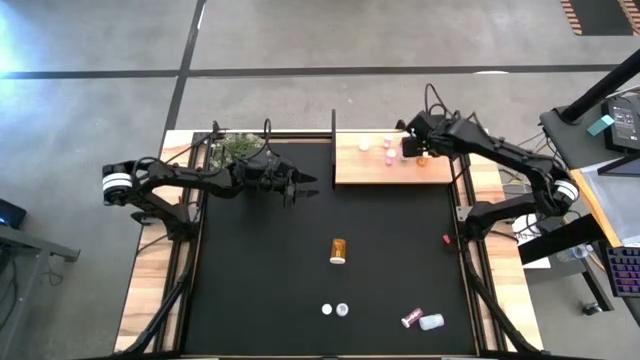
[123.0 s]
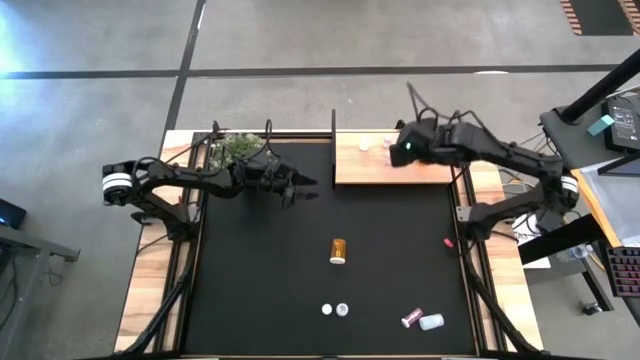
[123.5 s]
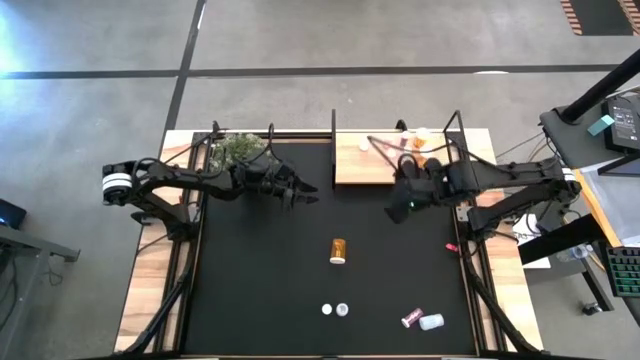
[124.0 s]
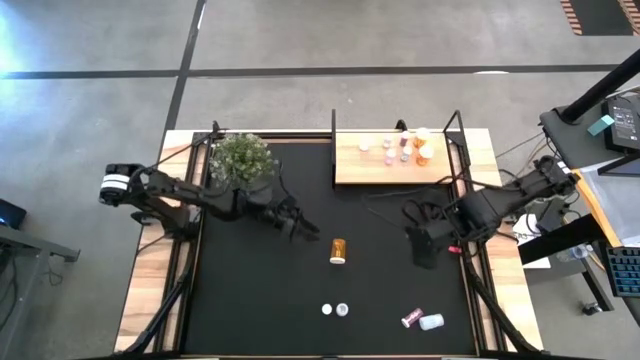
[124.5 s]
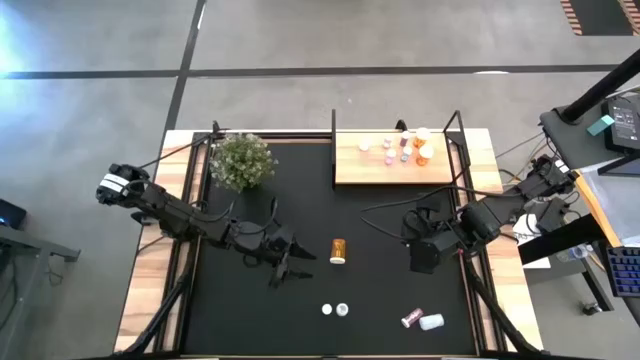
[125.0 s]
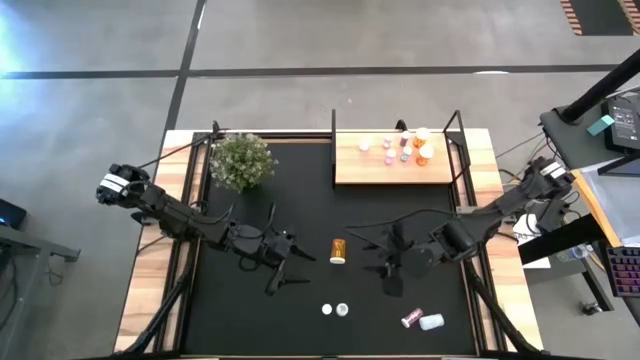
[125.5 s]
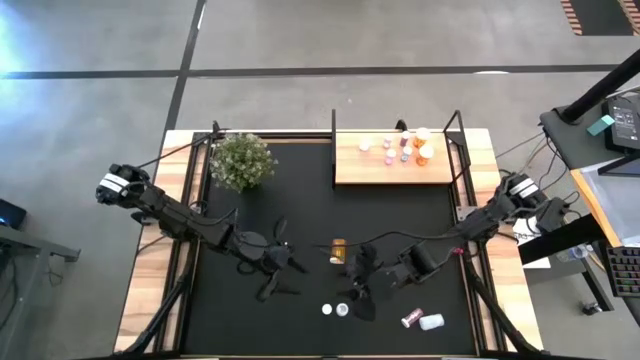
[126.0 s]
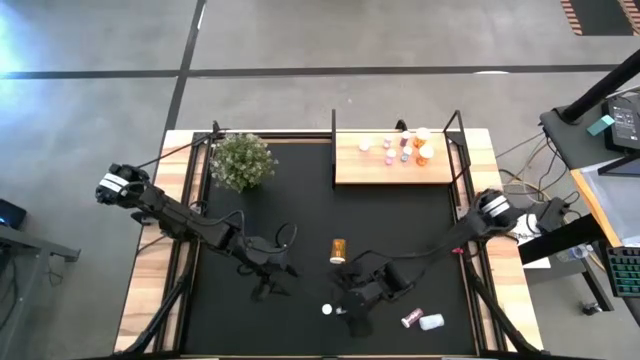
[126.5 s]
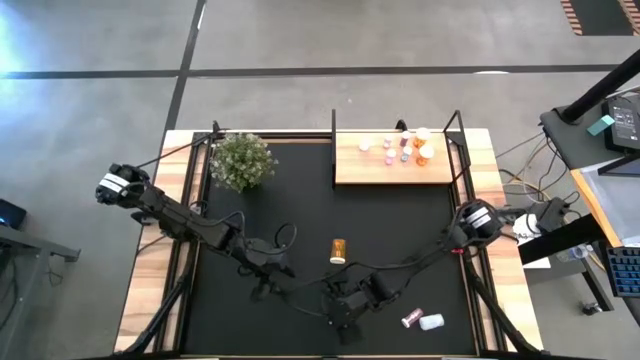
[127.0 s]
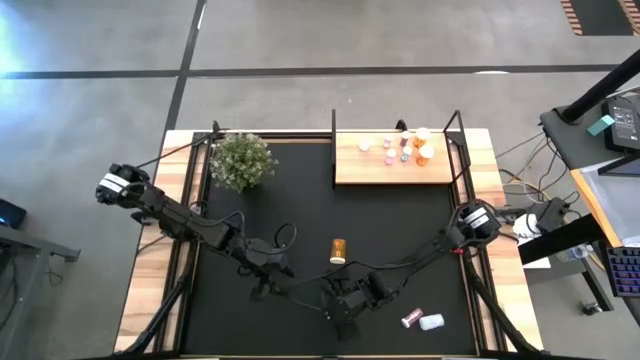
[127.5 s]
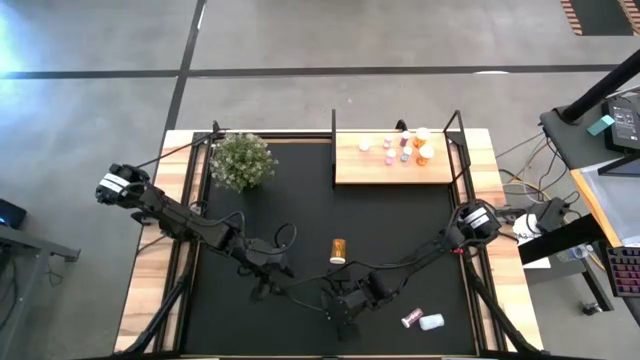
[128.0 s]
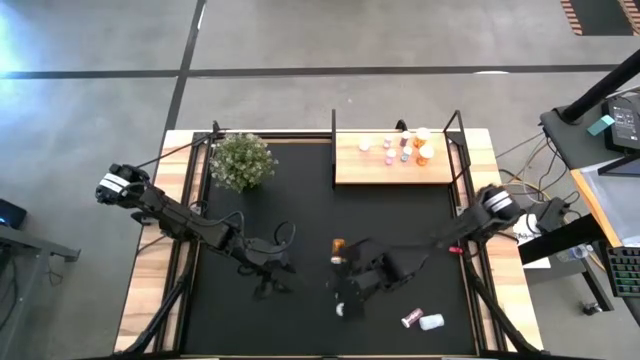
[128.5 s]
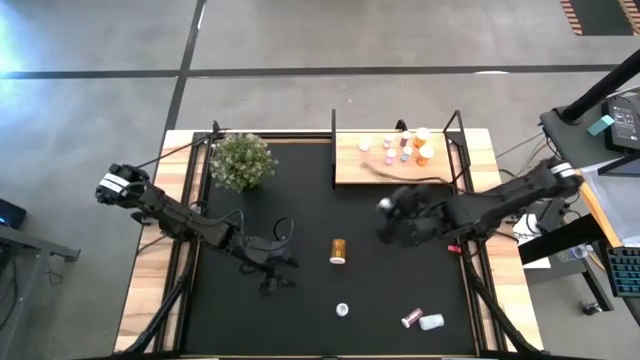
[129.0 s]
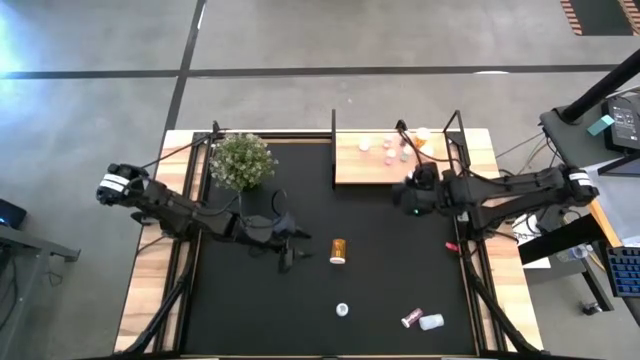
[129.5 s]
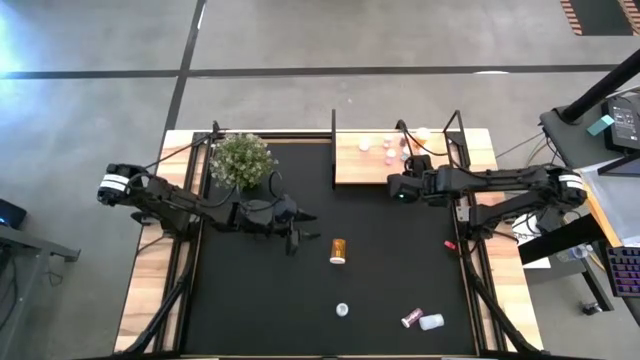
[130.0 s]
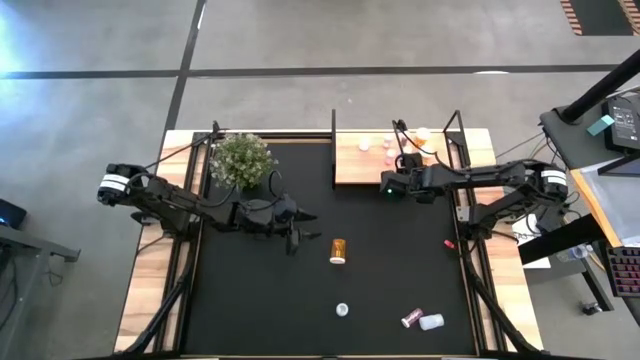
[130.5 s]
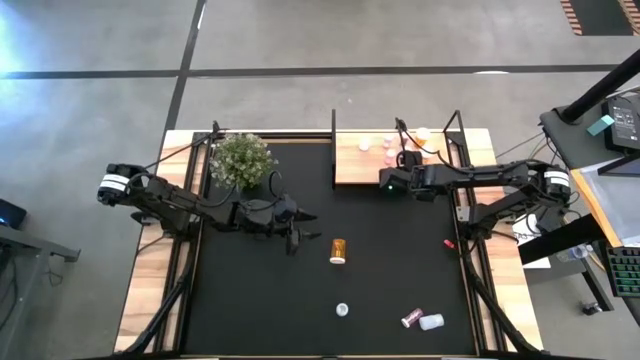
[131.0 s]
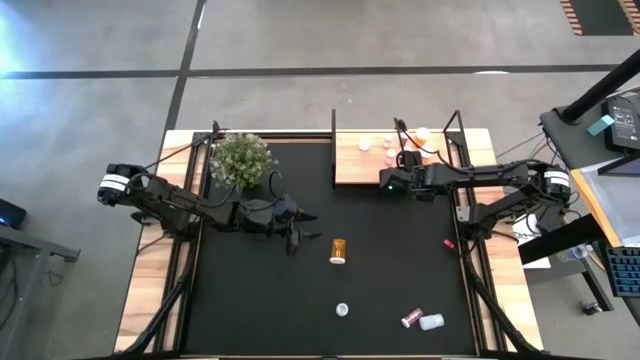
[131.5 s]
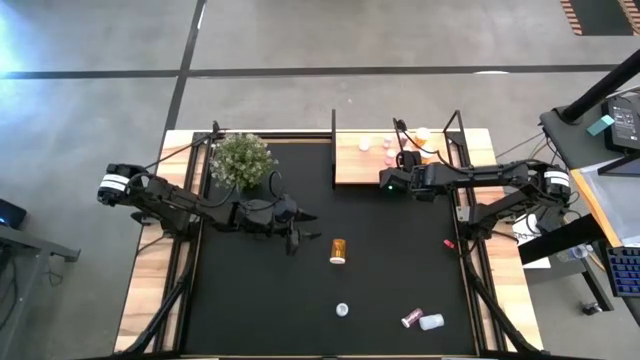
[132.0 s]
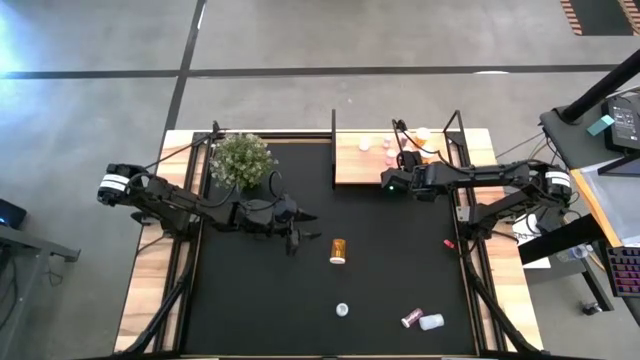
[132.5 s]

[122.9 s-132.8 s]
Task: Pick and place medicine bottles onto shelf by color
Put the blue pill bottle on the shelf aligned with the other blue pill bottles

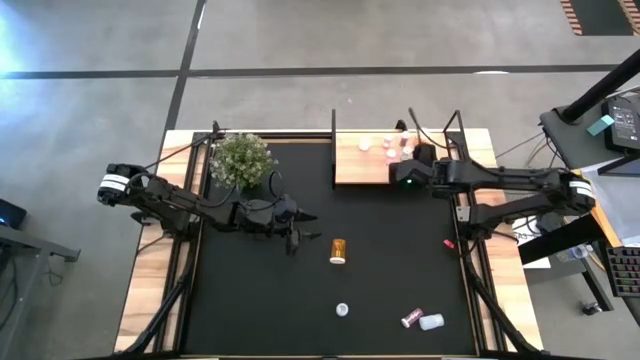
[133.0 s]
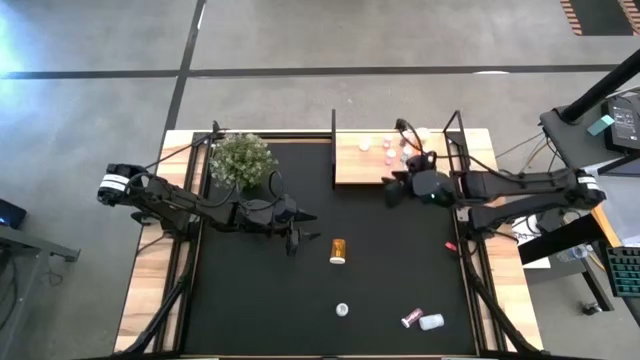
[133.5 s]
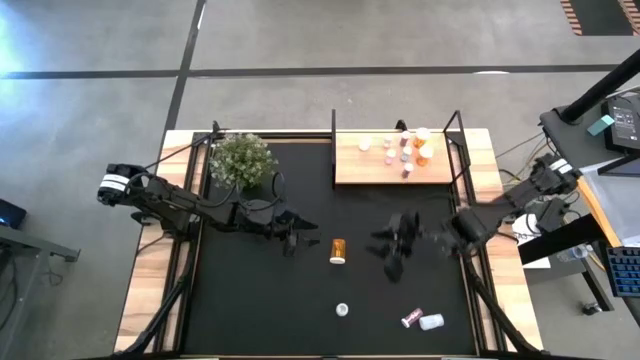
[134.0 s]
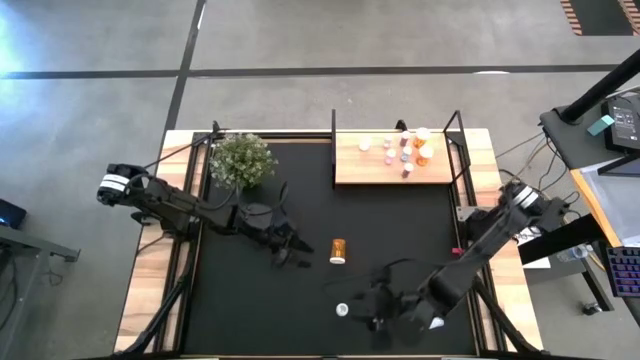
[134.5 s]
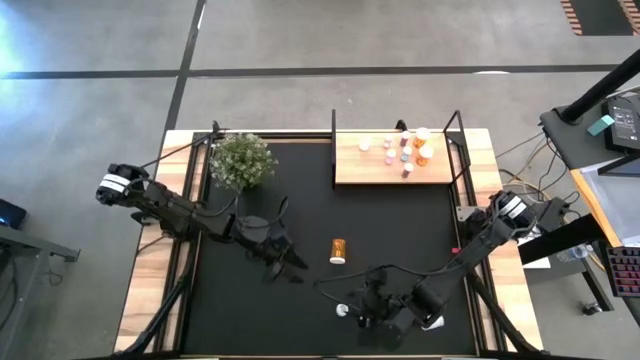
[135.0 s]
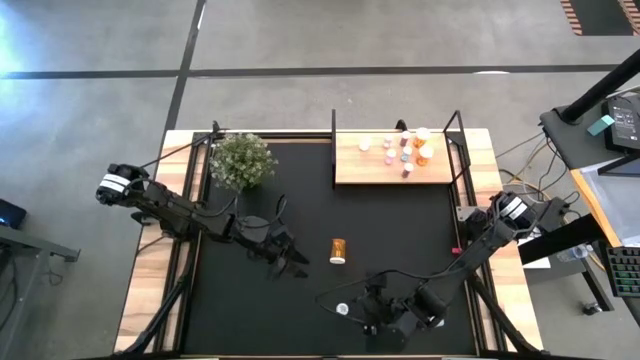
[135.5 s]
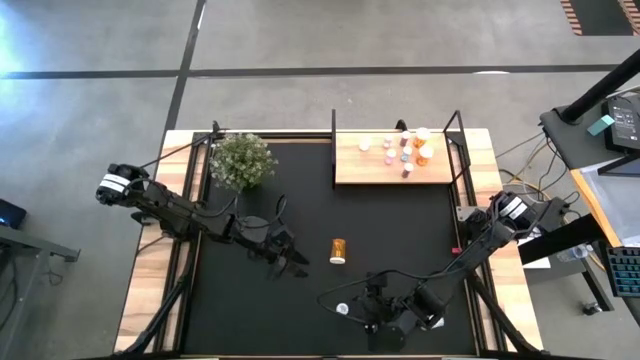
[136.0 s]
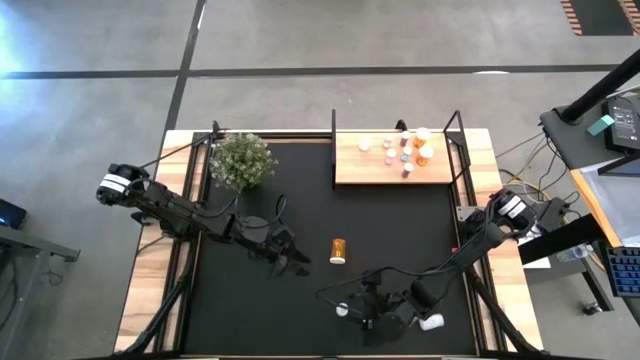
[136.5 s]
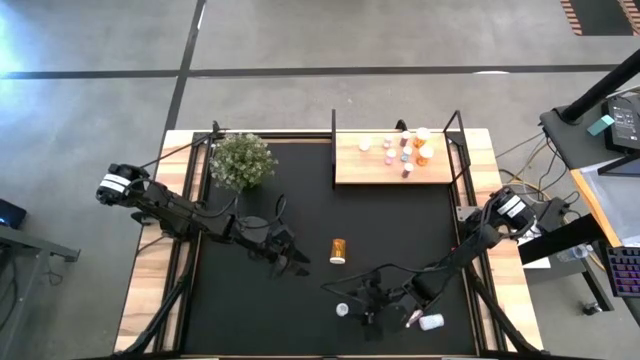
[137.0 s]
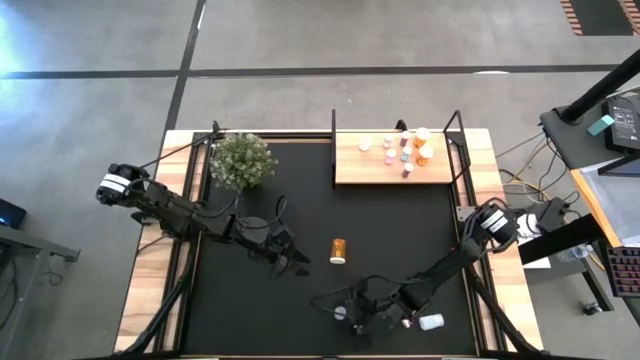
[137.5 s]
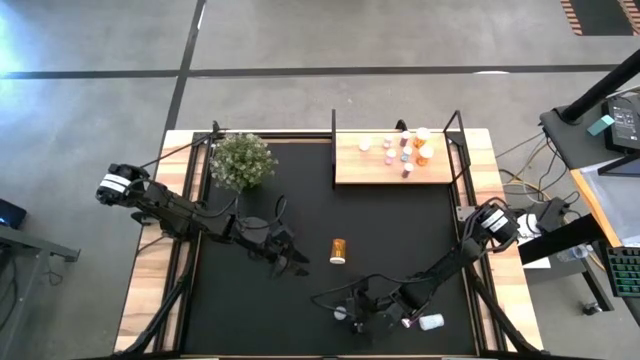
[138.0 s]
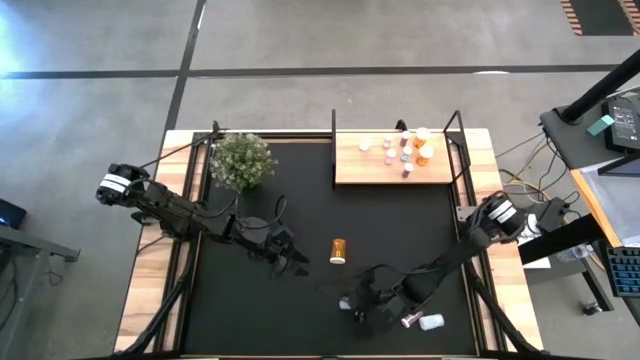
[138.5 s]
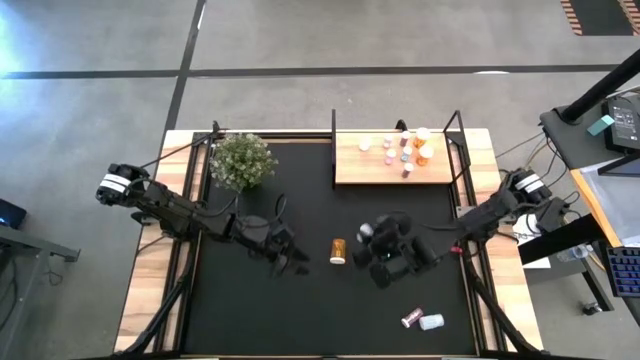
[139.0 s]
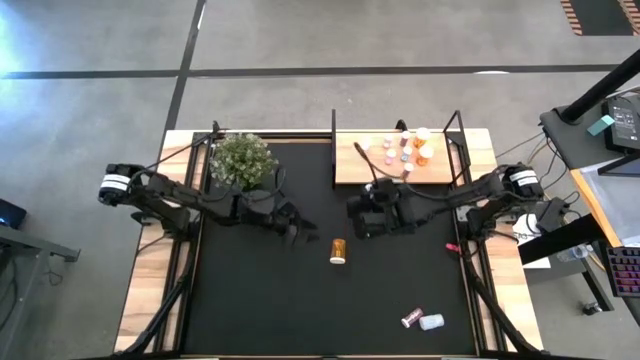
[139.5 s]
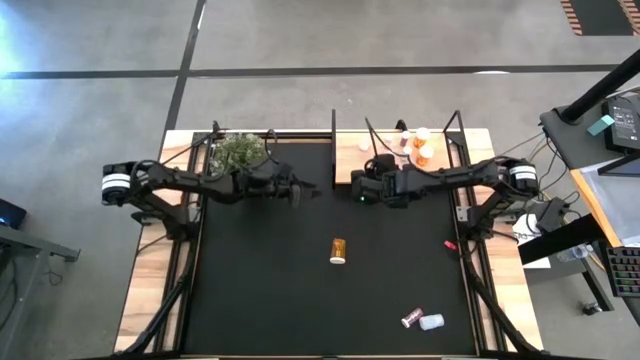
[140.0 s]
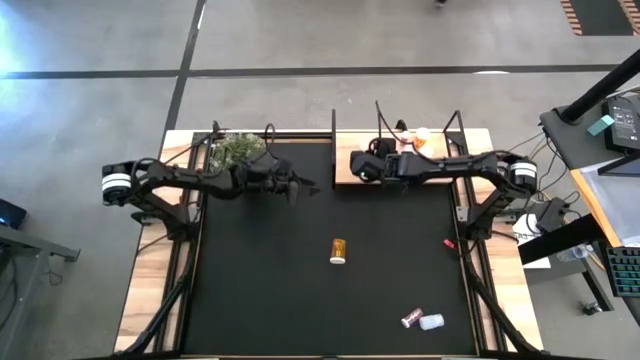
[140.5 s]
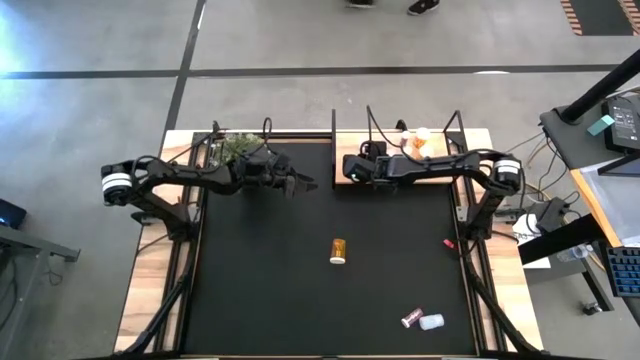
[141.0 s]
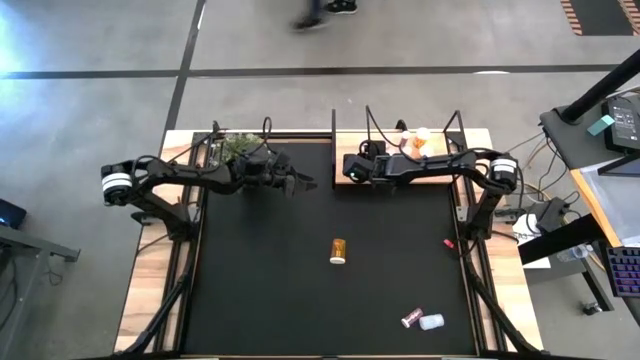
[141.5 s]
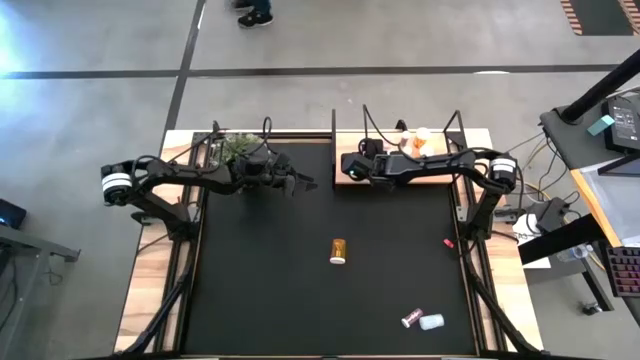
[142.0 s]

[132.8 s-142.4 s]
Put the left white pill bottle on the shelf aligned with the other white pill bottle
